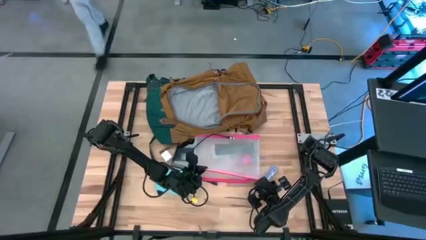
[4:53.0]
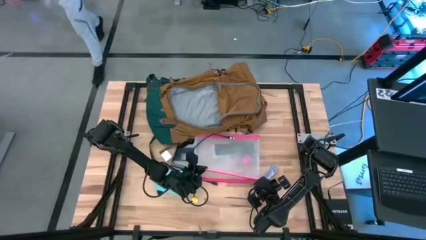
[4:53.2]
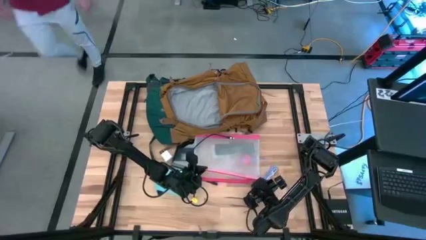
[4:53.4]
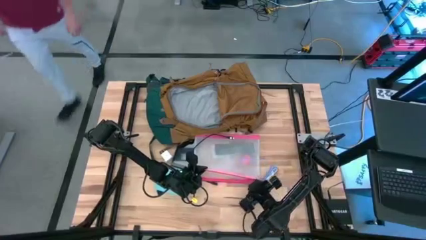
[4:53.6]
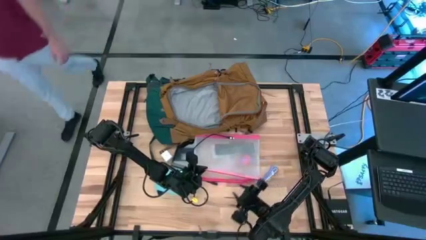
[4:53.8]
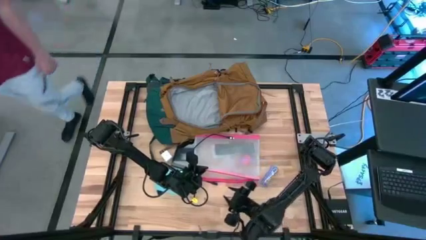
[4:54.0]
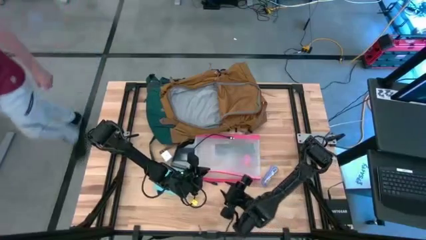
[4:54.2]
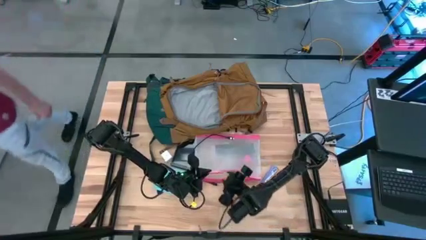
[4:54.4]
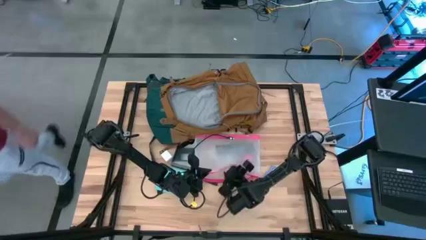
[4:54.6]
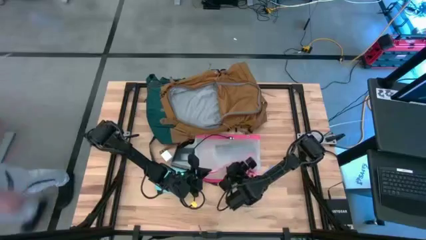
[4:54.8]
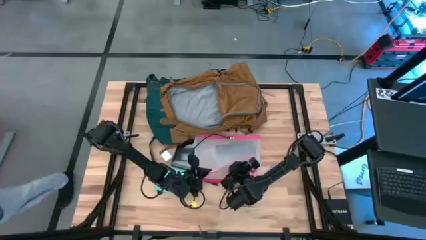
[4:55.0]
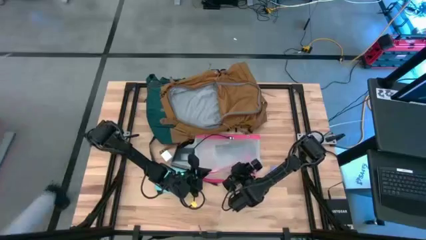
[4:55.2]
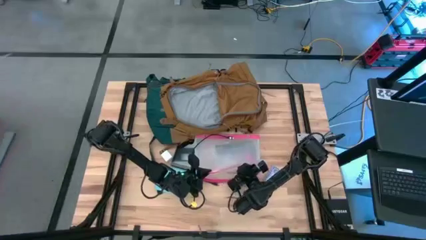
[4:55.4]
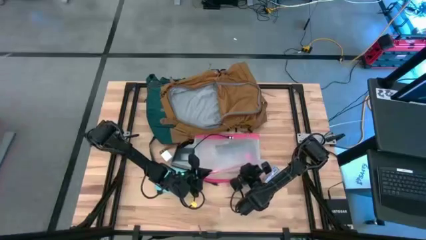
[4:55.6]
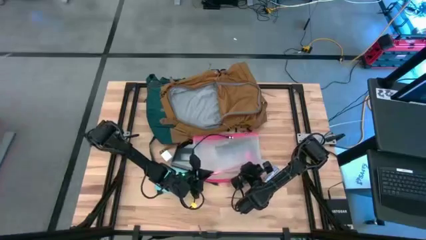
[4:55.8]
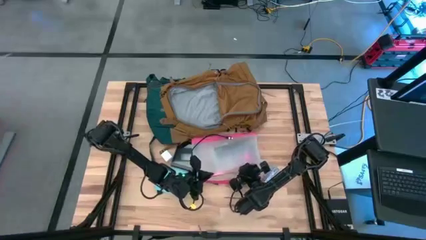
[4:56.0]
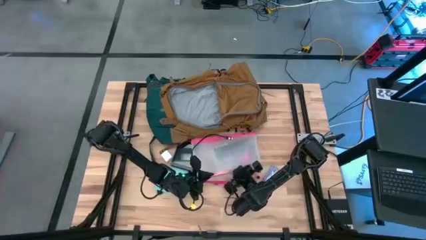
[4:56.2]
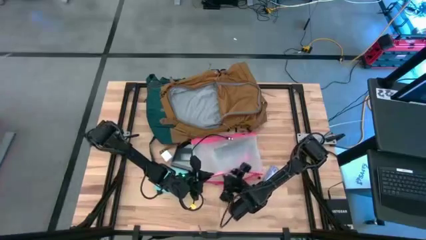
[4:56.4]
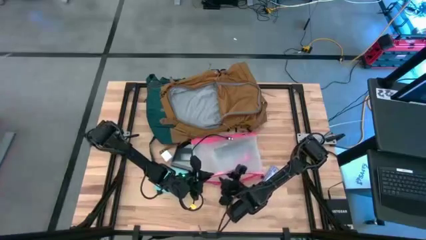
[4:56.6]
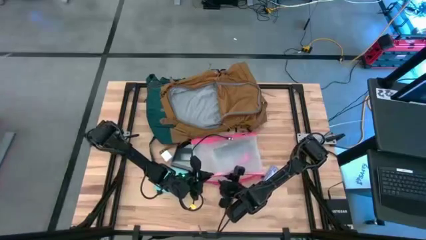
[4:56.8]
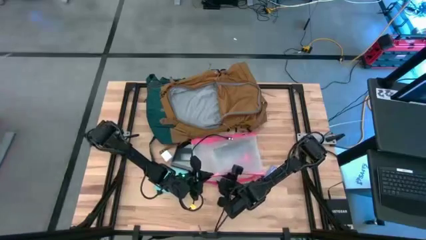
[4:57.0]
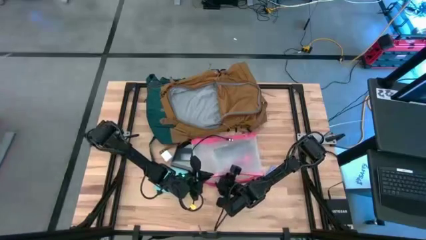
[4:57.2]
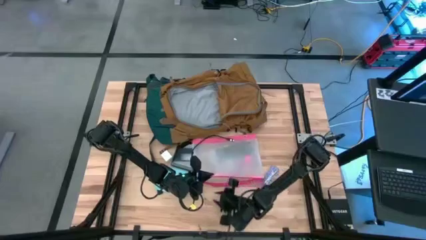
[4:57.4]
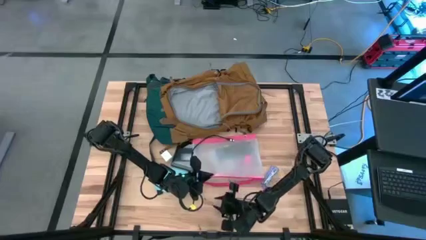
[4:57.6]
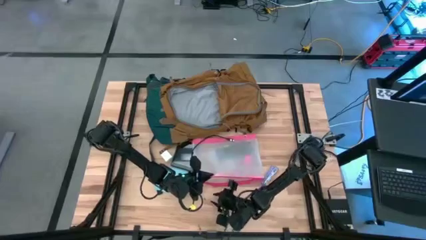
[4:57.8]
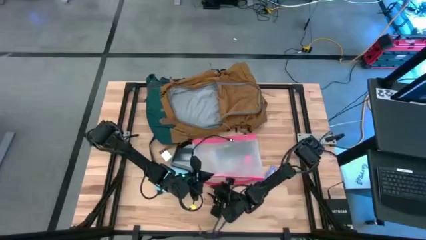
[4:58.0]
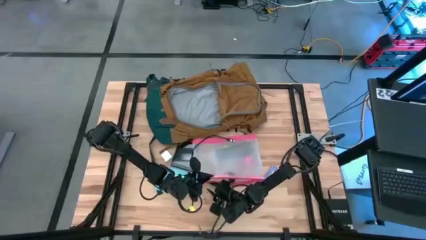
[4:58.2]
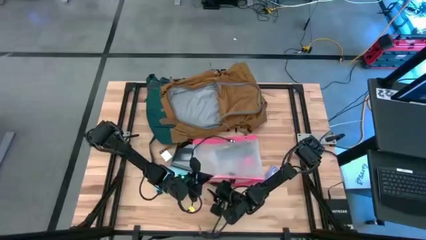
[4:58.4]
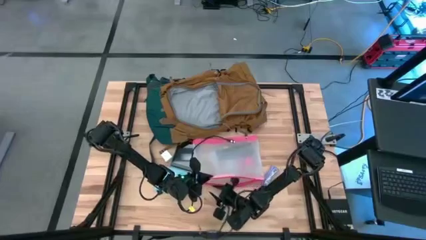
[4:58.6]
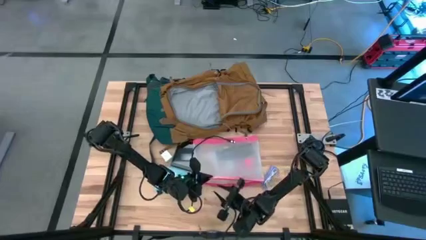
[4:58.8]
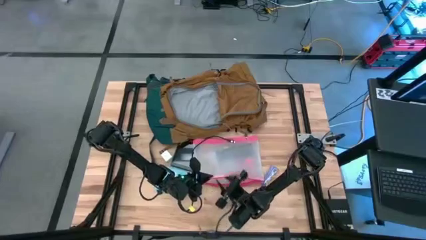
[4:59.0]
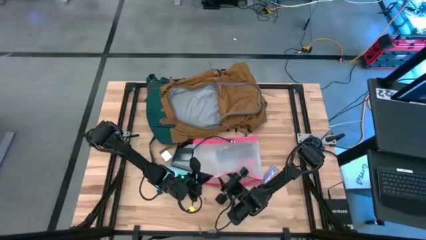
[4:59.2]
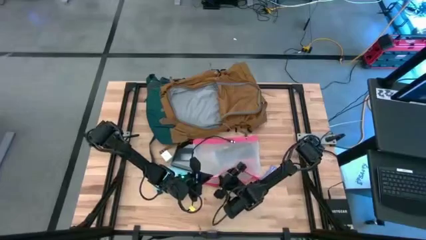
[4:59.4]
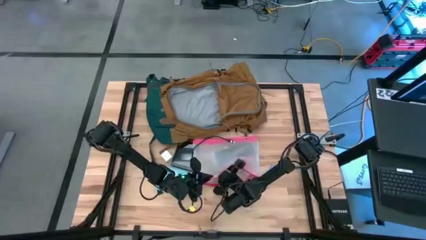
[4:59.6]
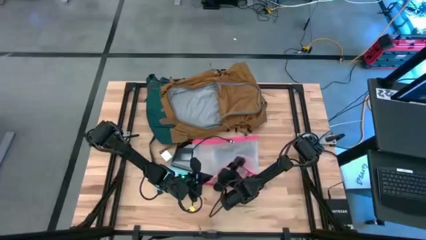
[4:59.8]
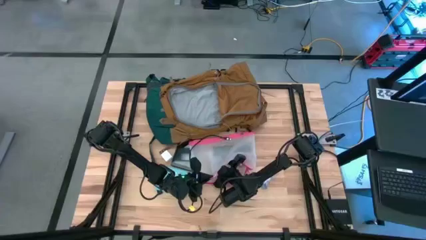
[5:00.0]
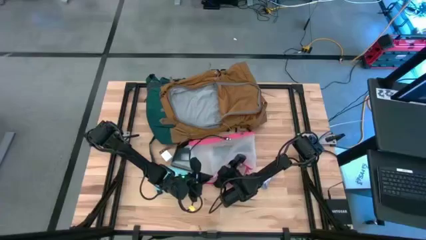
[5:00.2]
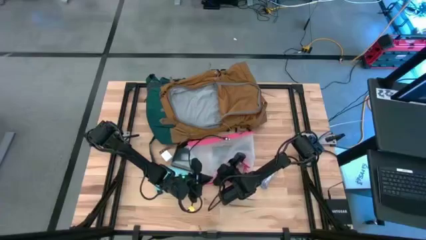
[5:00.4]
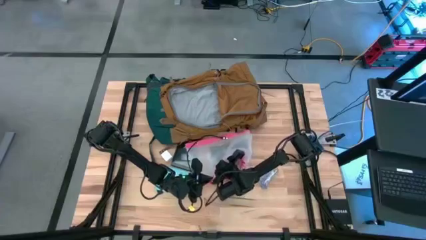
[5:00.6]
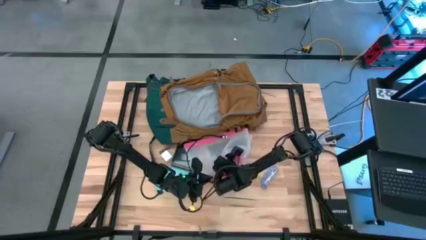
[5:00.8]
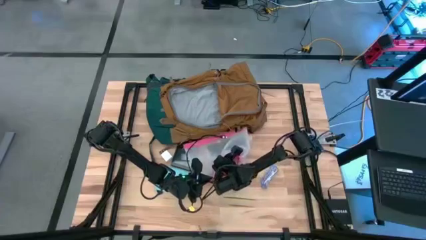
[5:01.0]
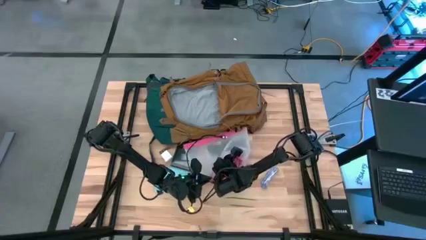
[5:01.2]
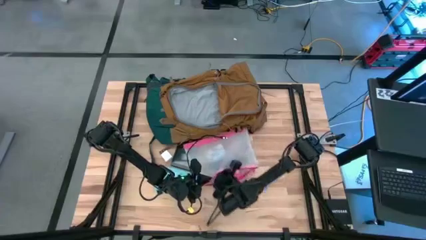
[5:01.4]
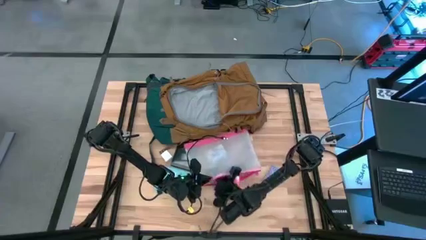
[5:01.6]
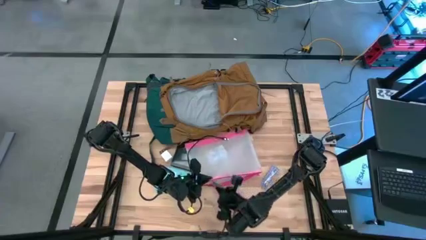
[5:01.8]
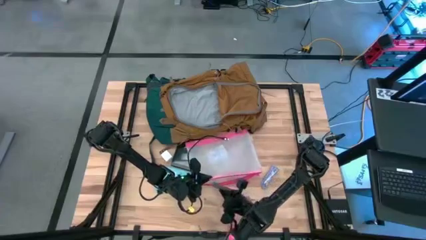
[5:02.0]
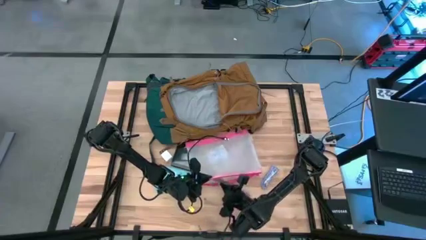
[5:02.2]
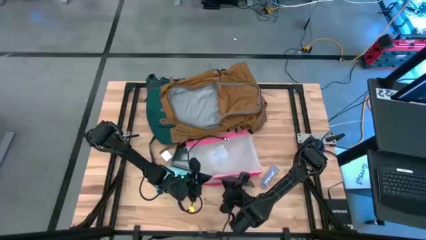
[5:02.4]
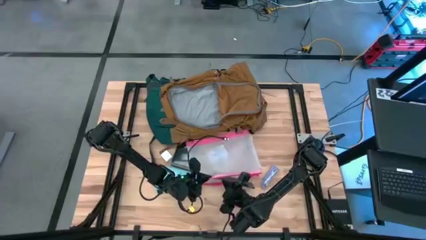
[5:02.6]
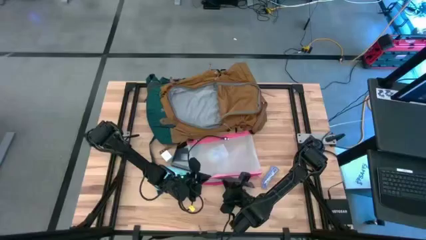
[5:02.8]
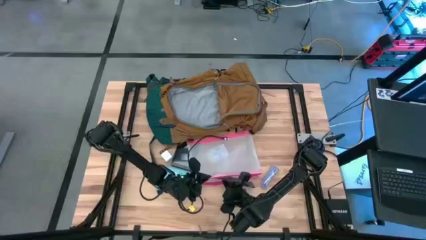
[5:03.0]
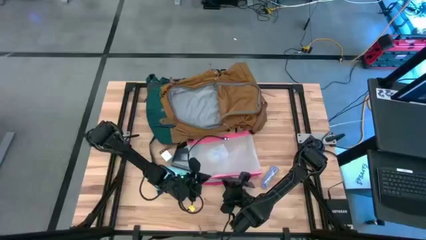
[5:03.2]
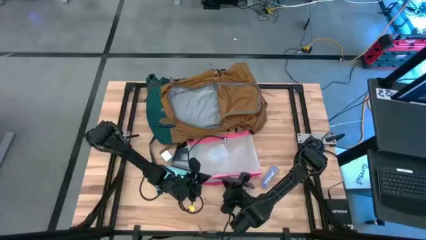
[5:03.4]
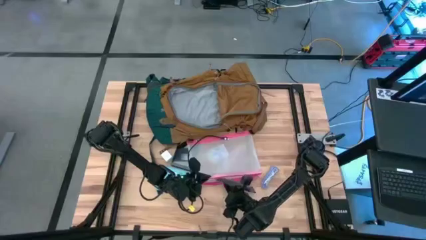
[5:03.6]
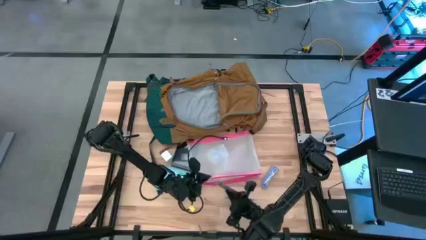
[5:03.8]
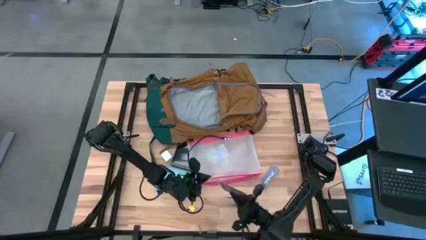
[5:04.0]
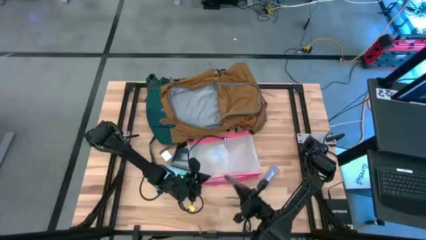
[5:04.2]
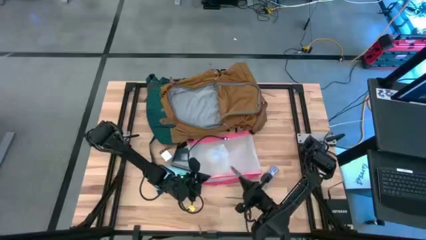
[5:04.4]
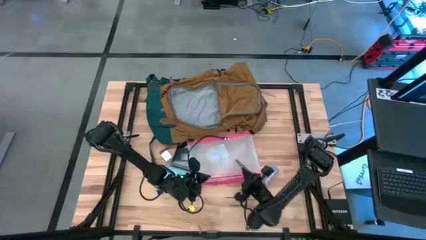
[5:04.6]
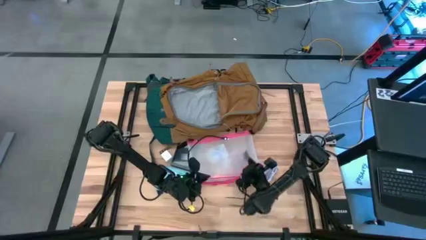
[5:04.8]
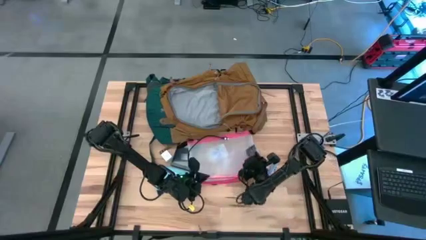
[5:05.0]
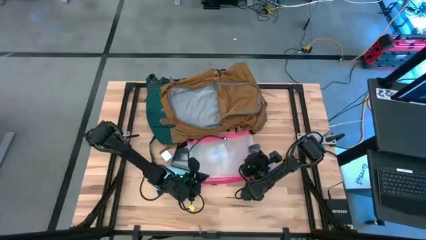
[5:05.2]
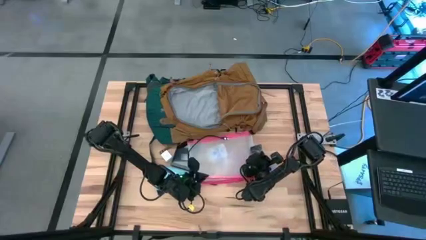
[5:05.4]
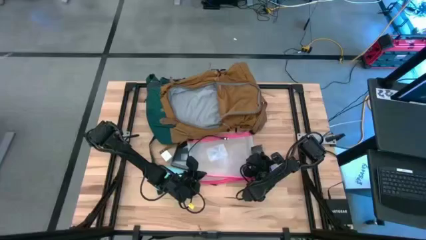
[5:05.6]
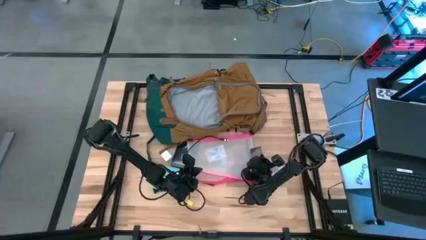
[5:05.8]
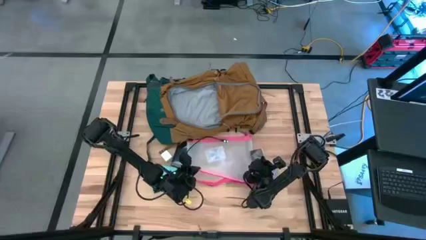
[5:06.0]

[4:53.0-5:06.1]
Task: Unpack backpack
Remove the black pouch from the pink zipper pouch

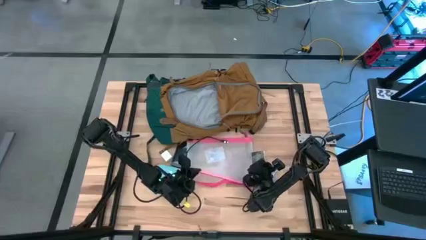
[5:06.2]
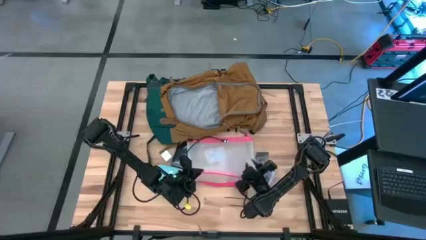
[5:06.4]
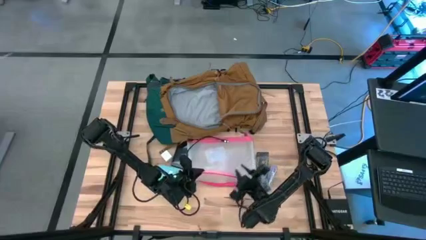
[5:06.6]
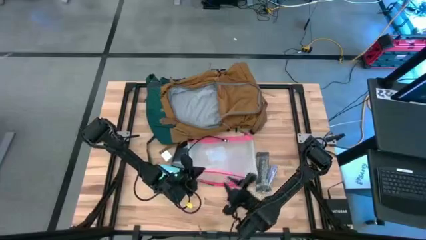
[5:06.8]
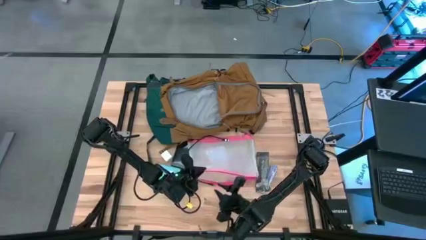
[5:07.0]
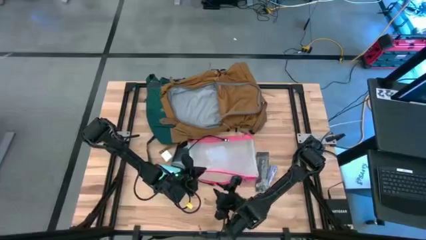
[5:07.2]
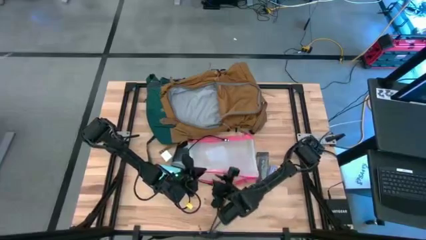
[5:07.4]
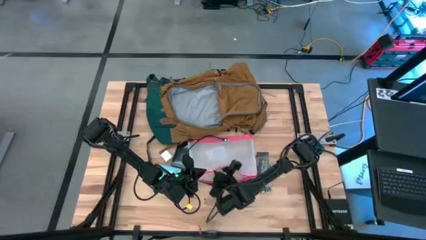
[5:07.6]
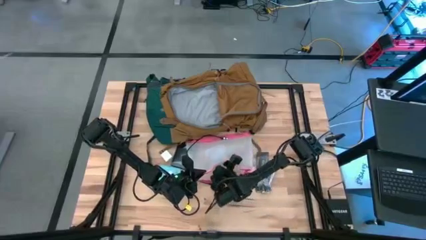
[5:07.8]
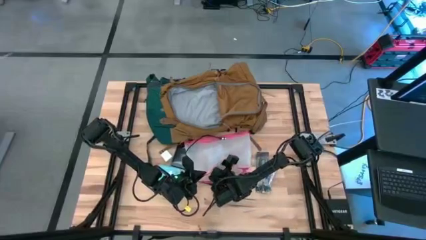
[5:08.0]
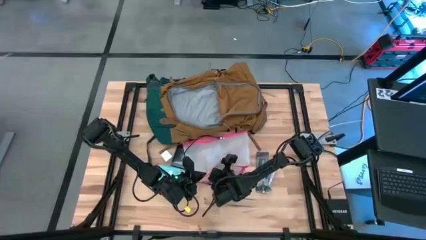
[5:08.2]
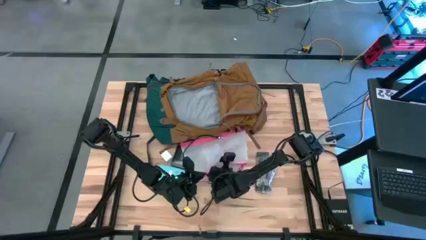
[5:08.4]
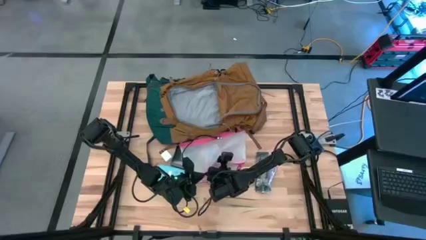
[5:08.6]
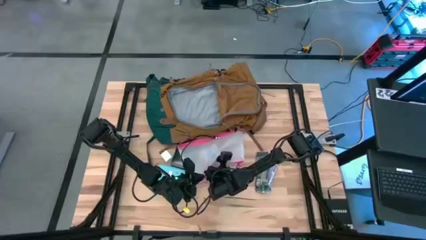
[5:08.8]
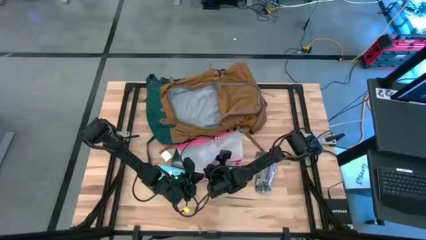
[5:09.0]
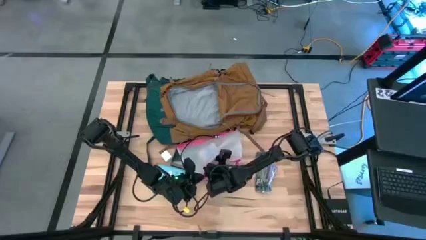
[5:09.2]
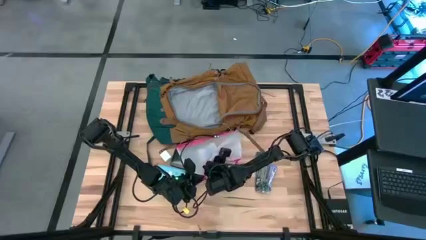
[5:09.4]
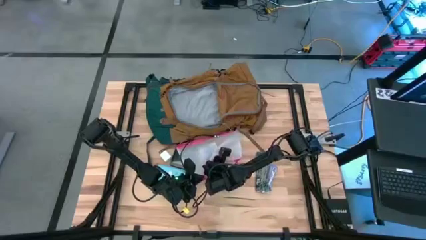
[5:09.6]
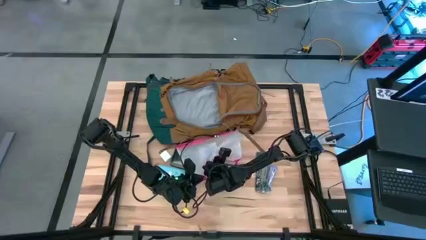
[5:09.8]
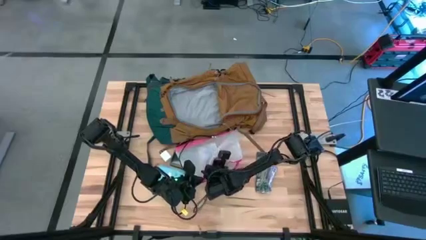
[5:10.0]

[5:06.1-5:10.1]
Remove the pink earphones from the pink zipper pouch
